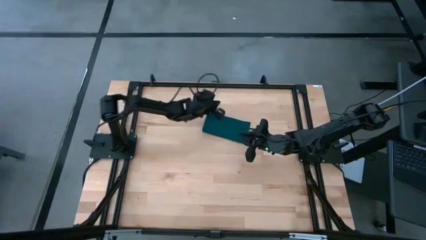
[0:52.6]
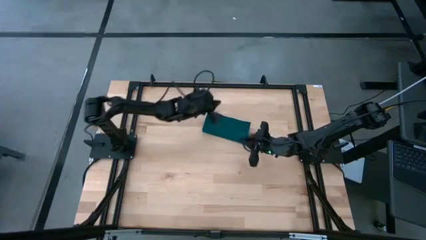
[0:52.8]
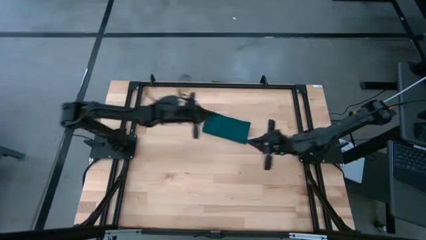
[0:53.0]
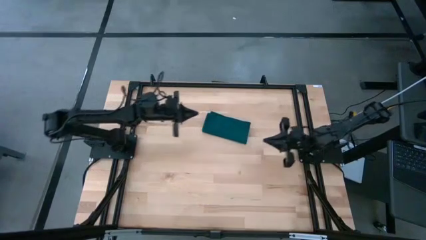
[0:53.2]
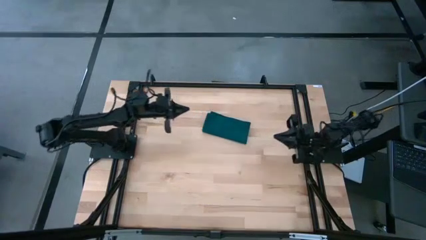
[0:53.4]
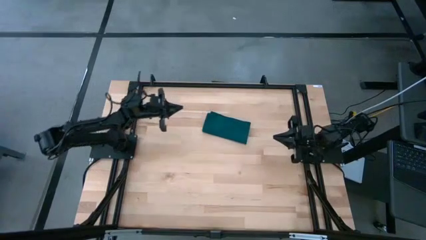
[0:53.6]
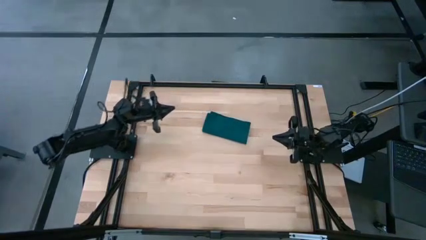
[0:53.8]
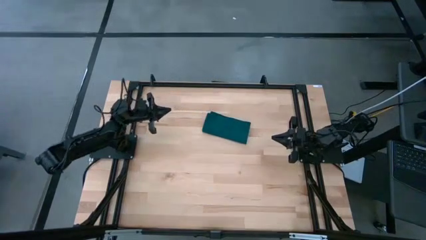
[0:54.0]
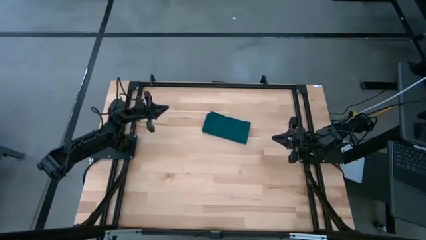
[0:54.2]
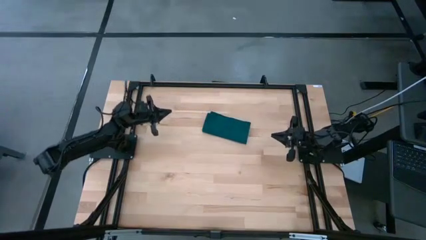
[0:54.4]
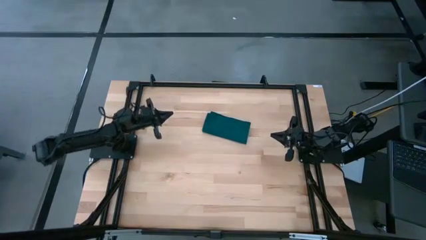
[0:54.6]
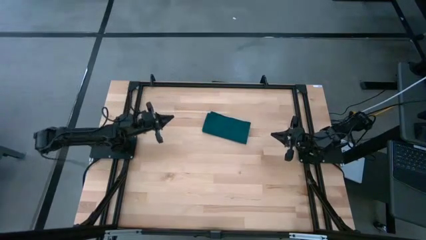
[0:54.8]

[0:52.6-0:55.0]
Task: Fold microfiber towels
Return to Home Position

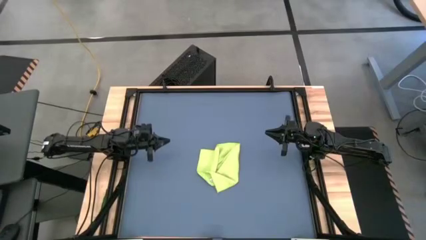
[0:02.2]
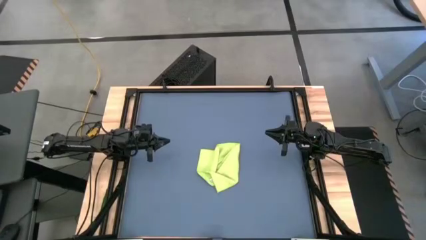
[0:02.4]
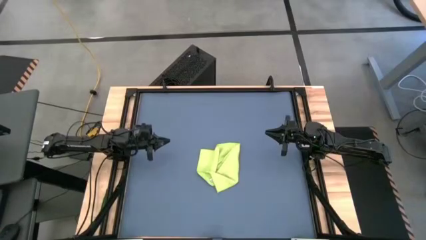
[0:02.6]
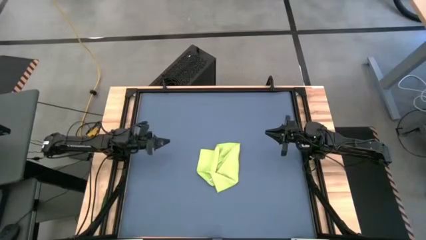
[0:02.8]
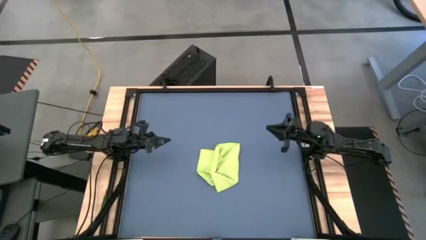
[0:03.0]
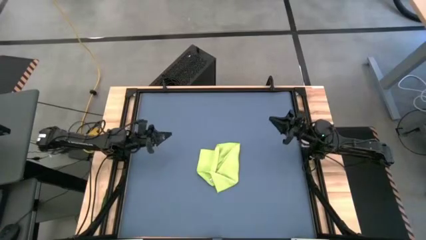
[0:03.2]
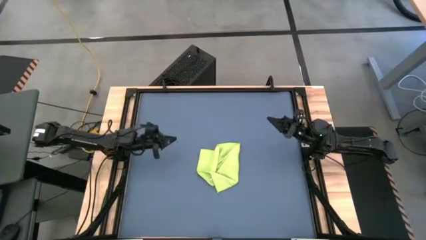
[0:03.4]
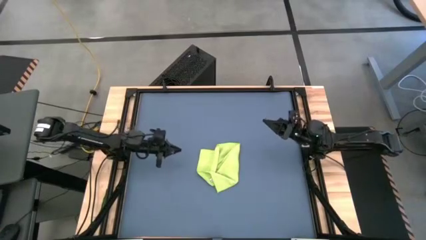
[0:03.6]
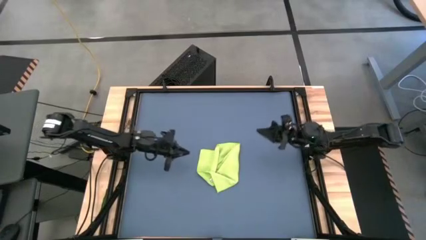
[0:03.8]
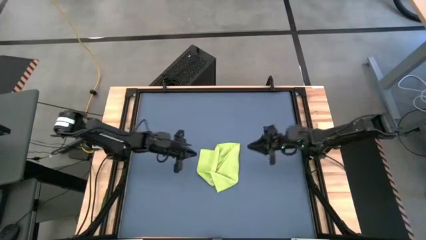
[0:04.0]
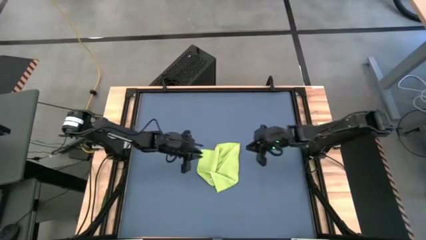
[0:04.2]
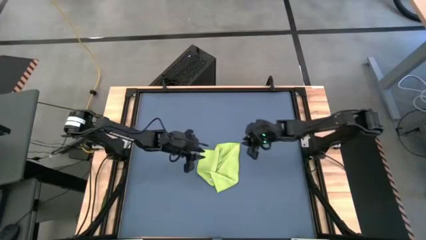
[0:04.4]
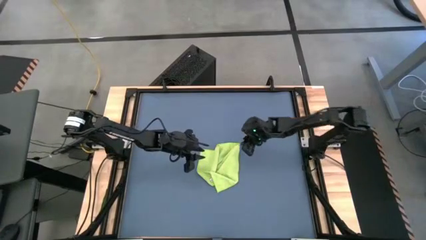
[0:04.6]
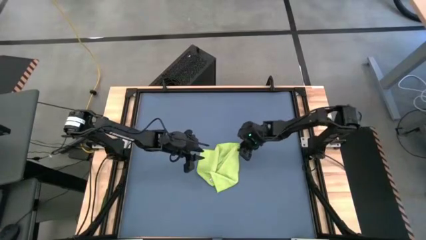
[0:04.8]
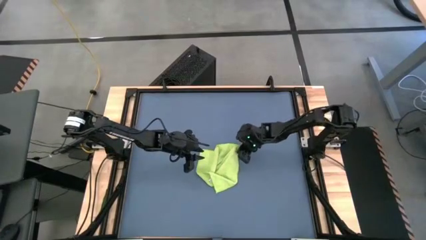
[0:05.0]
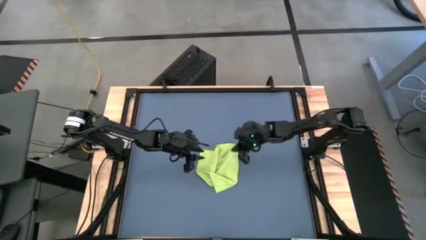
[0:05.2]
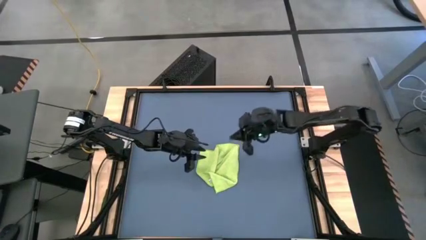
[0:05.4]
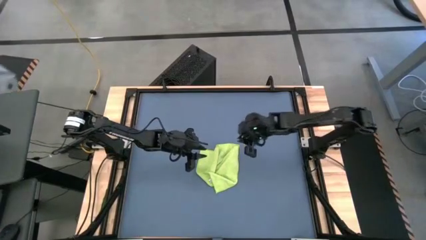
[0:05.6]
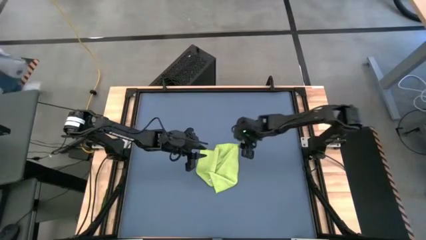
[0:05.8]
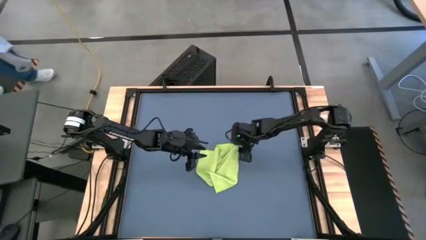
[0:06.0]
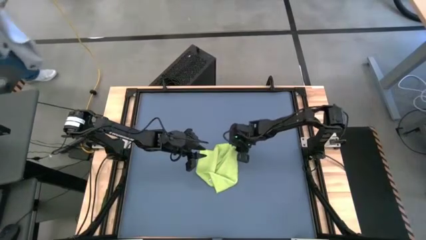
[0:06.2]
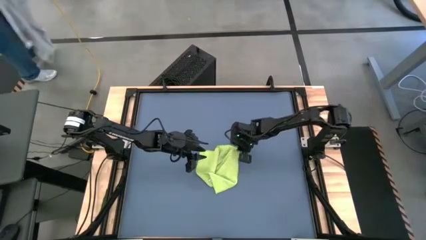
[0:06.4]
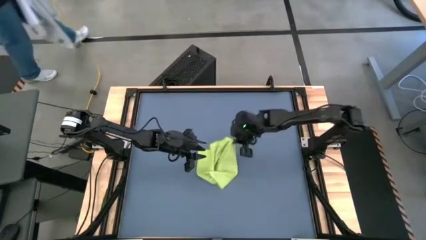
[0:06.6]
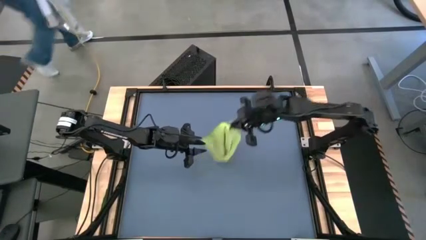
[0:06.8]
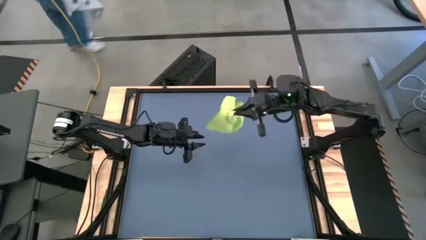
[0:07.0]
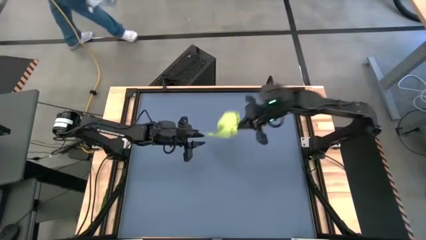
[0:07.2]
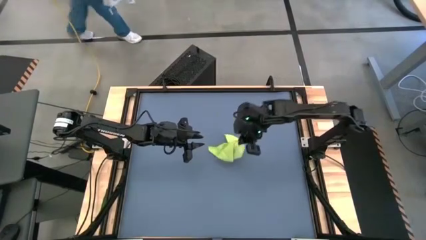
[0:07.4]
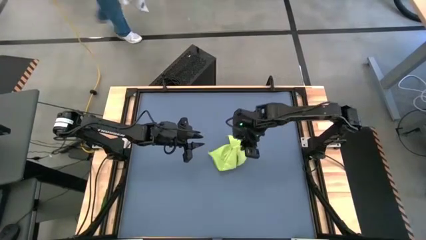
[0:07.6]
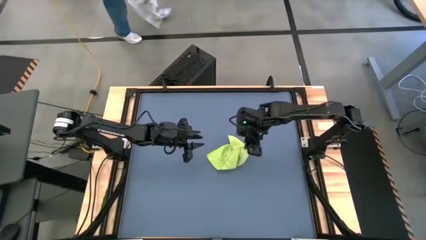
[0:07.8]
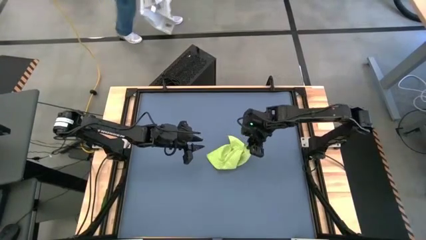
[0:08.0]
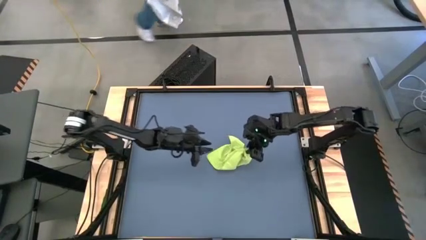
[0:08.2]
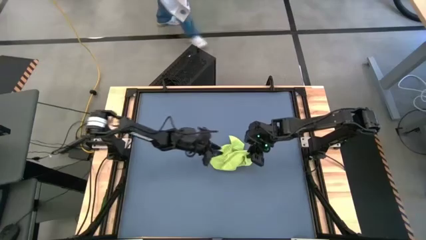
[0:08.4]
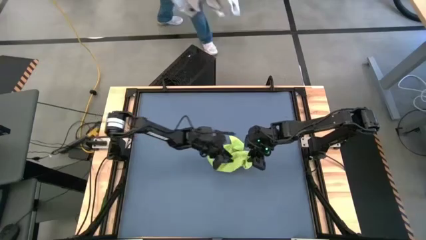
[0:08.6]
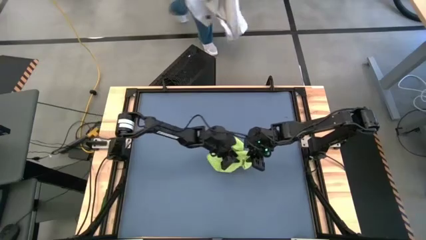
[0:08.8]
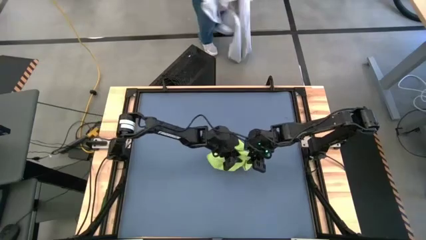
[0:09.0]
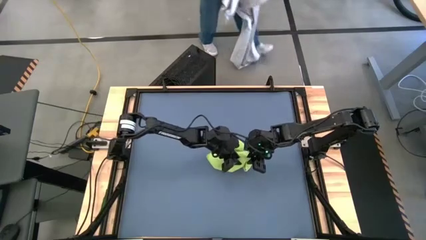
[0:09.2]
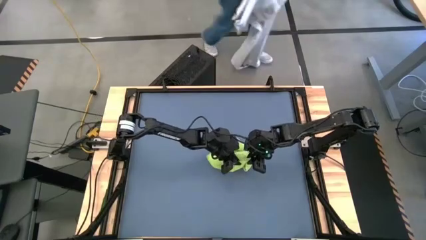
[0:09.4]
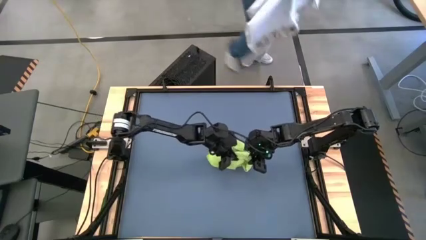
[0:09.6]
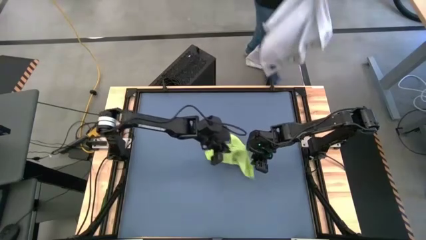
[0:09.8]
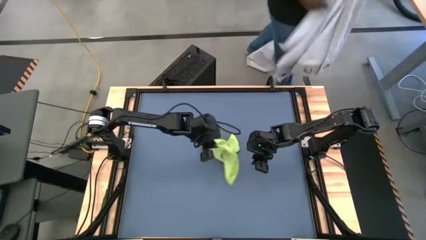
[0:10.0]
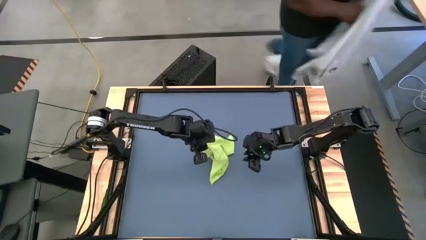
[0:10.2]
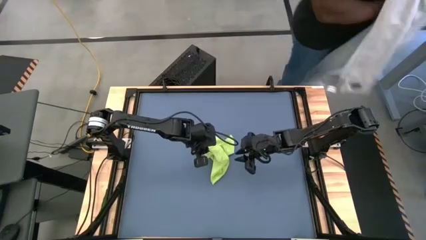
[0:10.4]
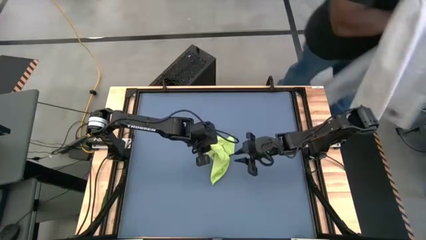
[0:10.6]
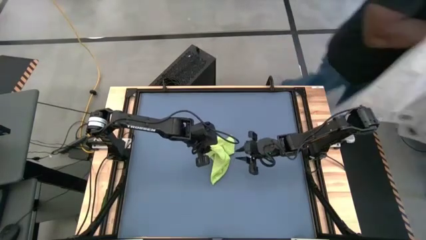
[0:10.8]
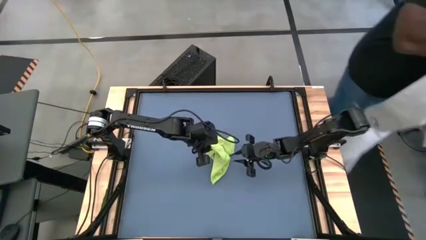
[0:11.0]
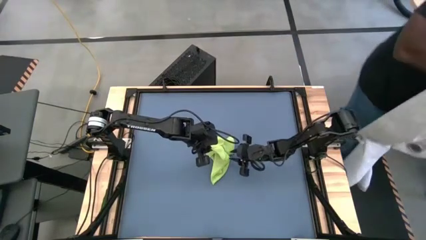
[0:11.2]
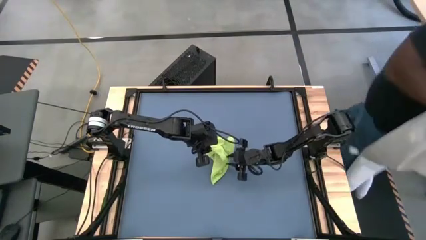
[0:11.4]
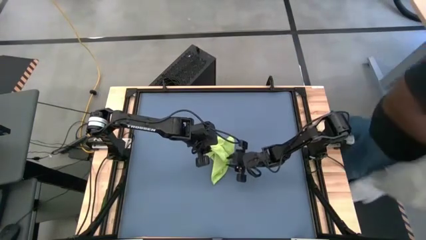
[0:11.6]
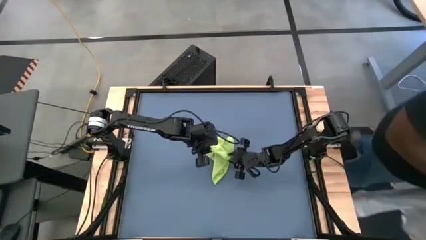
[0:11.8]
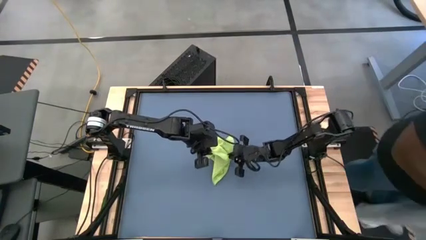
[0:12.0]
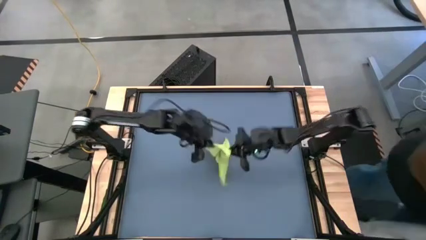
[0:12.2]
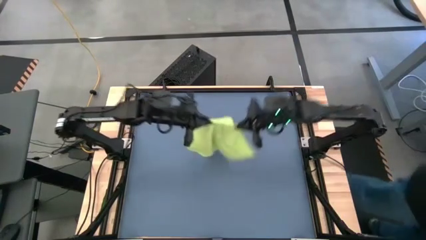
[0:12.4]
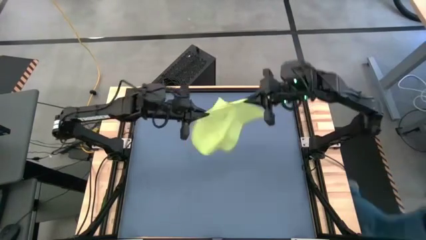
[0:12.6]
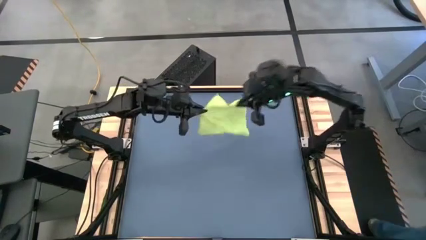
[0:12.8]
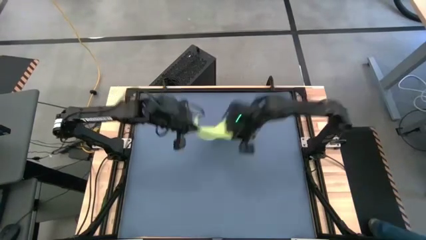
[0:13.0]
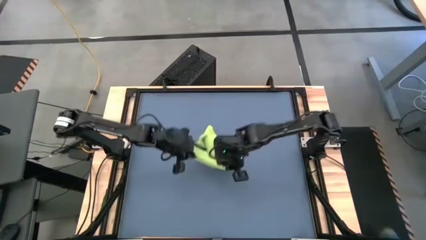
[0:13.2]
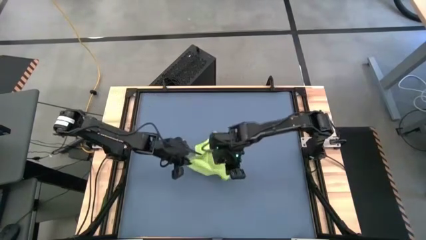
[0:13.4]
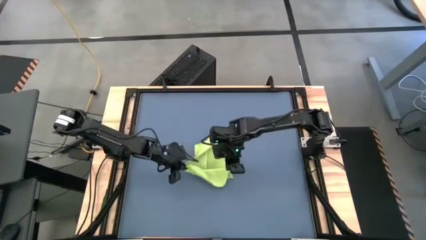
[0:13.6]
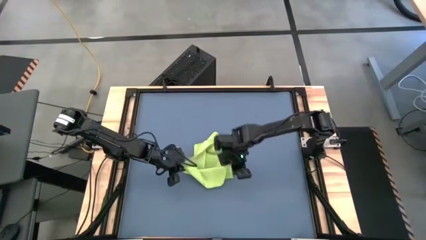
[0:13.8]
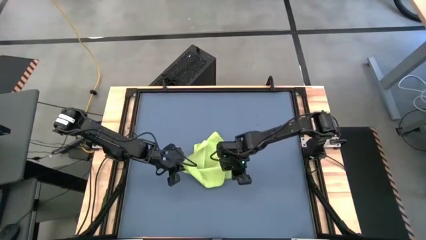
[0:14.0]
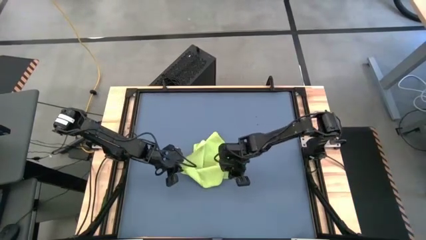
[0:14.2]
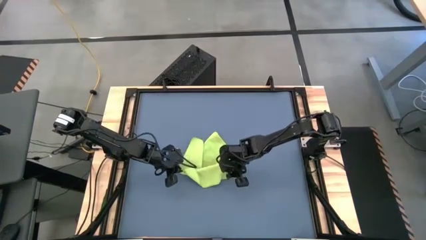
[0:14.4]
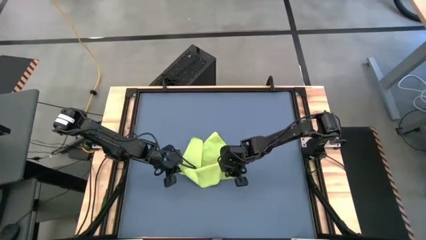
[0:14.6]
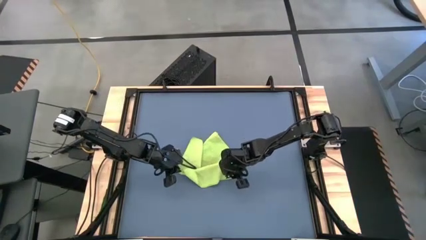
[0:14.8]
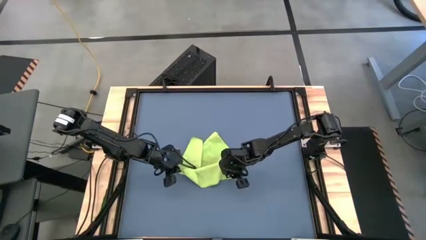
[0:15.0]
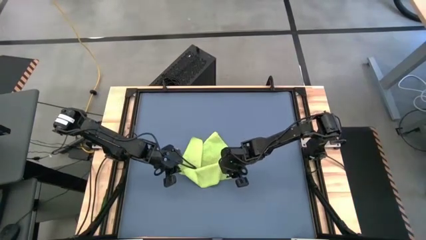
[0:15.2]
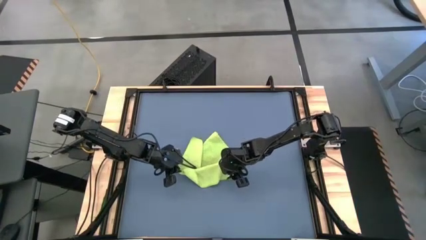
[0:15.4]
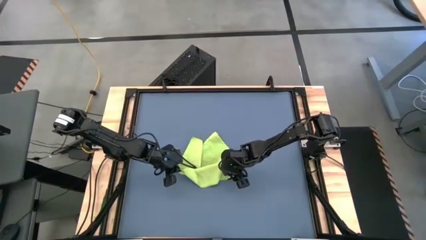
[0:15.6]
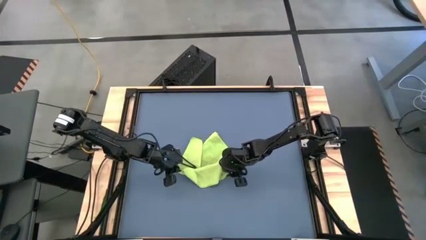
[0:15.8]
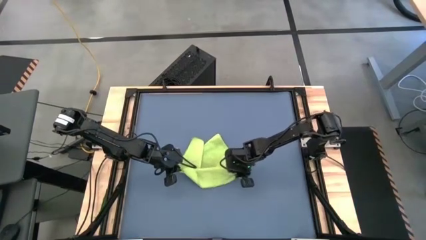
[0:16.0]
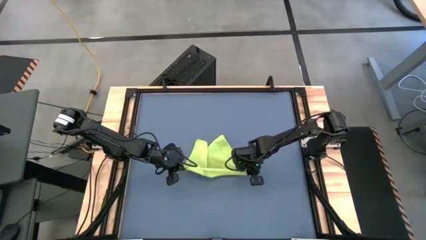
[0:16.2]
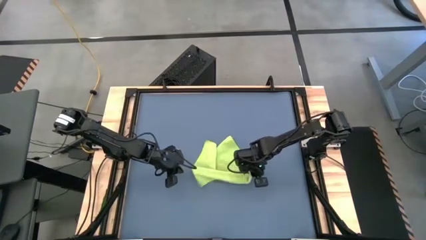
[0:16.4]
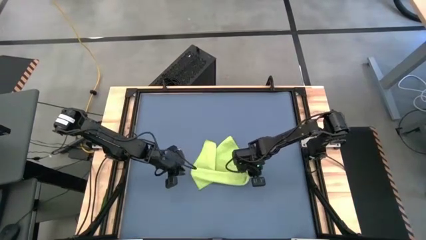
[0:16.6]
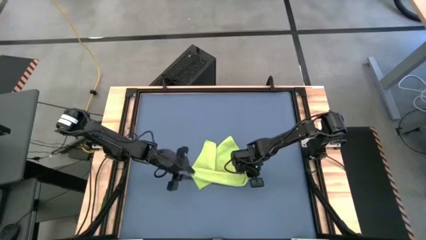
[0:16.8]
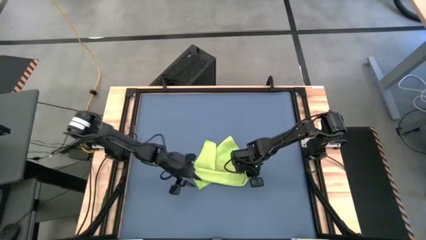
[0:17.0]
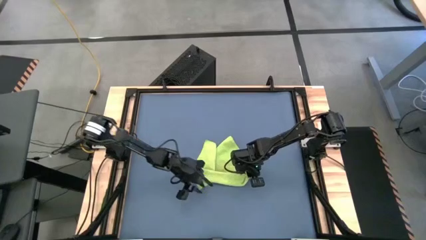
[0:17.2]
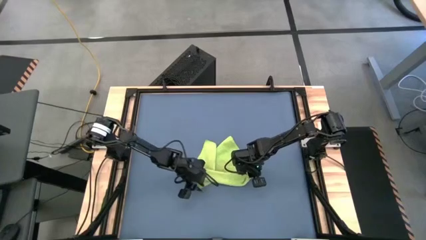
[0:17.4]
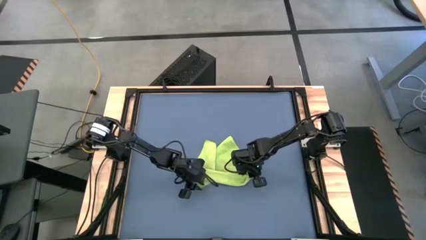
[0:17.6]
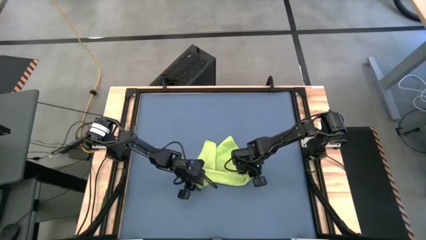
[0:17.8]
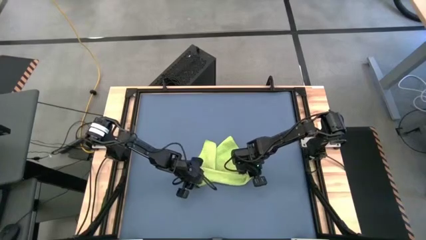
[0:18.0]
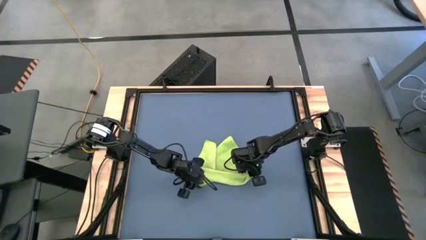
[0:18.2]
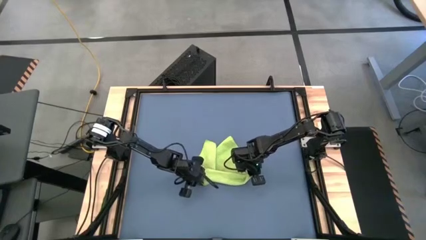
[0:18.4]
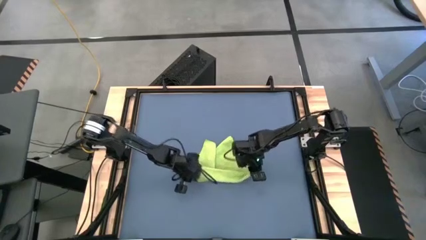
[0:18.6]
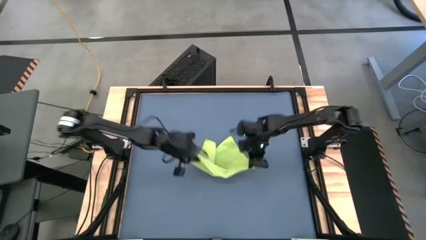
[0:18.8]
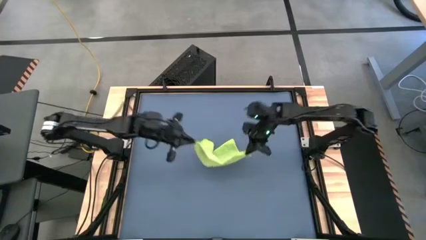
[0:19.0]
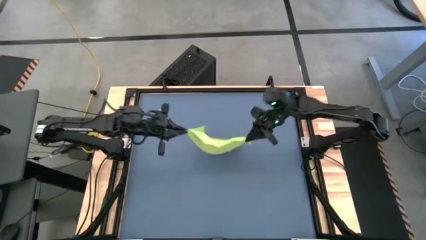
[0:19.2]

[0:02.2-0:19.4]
Task: Roll towel
Roll the green microfiber towel
